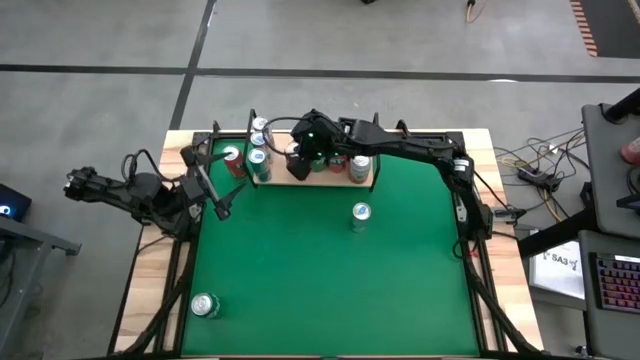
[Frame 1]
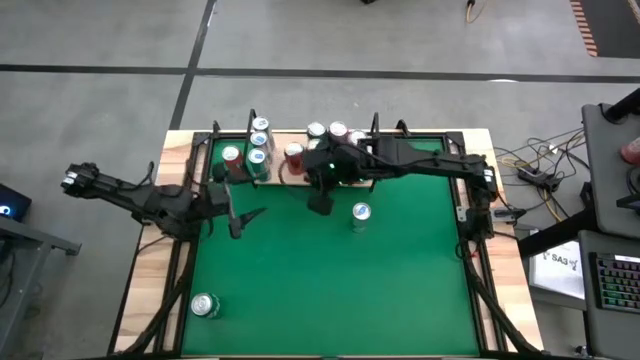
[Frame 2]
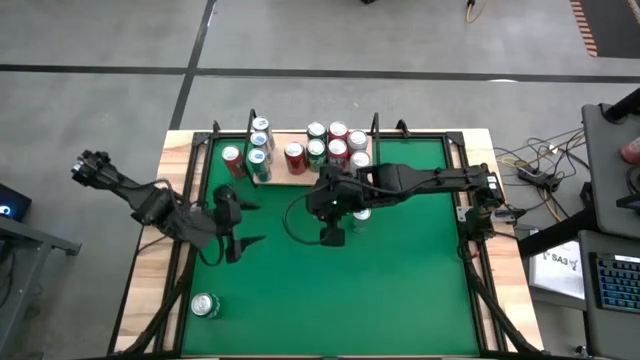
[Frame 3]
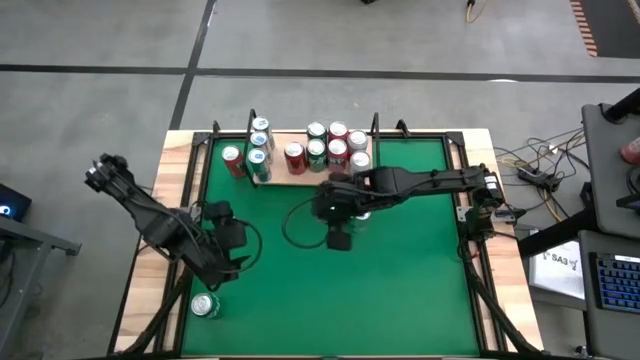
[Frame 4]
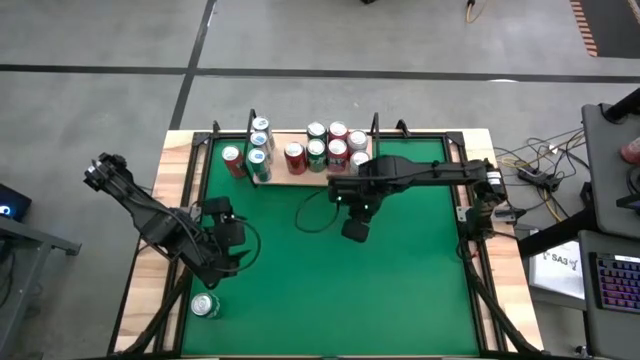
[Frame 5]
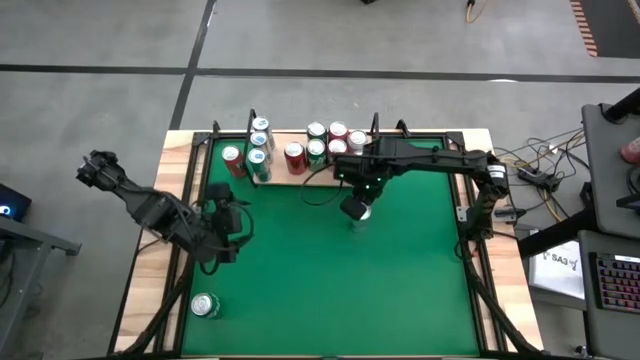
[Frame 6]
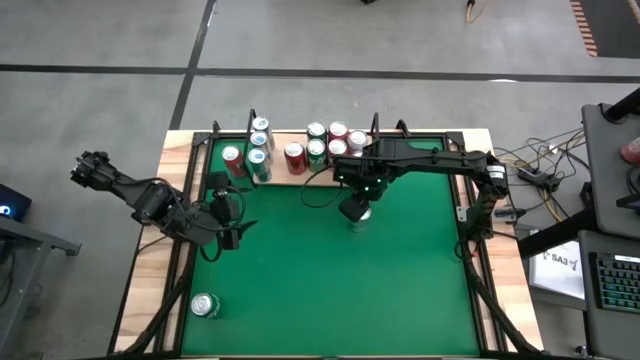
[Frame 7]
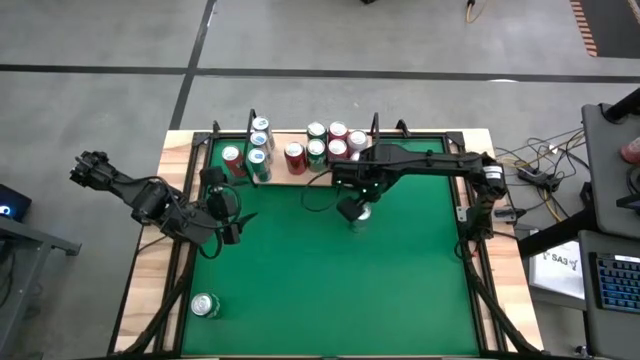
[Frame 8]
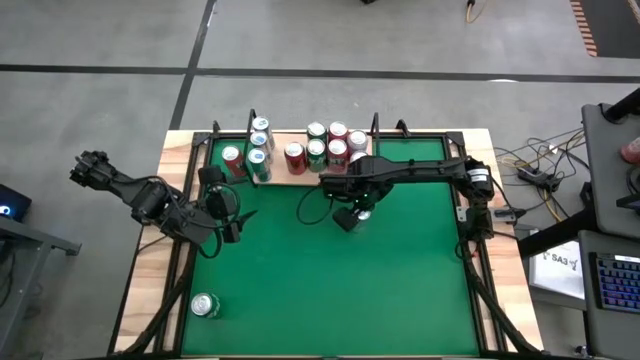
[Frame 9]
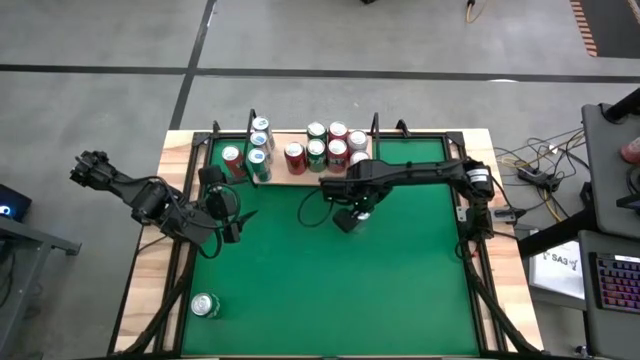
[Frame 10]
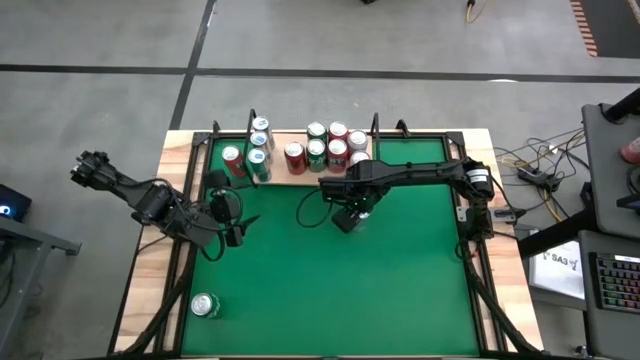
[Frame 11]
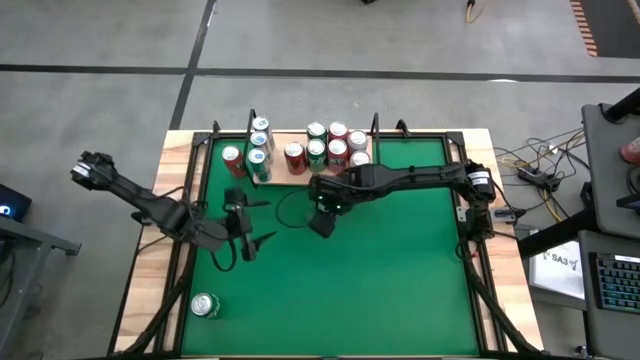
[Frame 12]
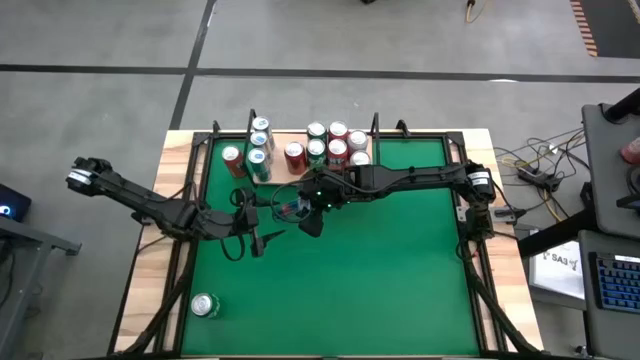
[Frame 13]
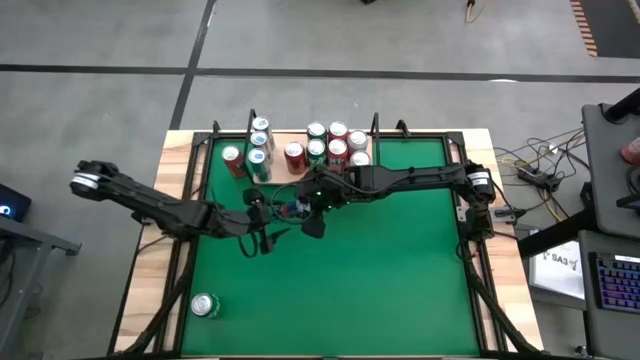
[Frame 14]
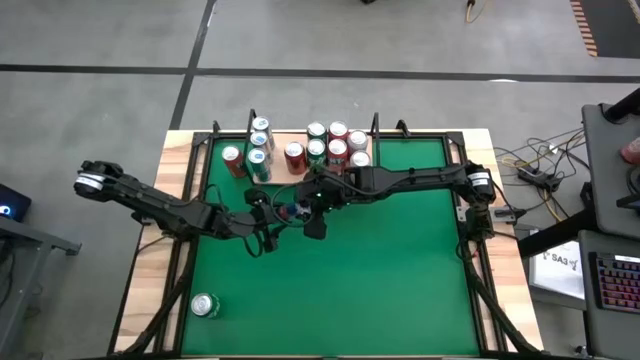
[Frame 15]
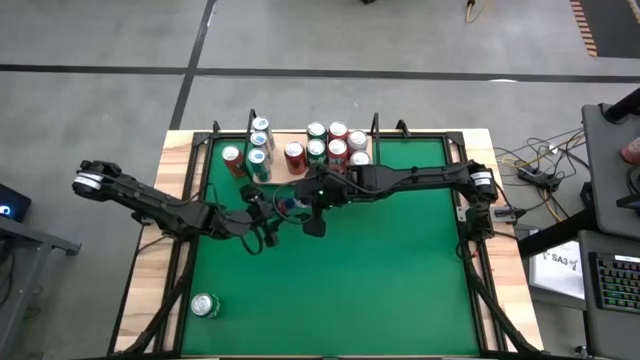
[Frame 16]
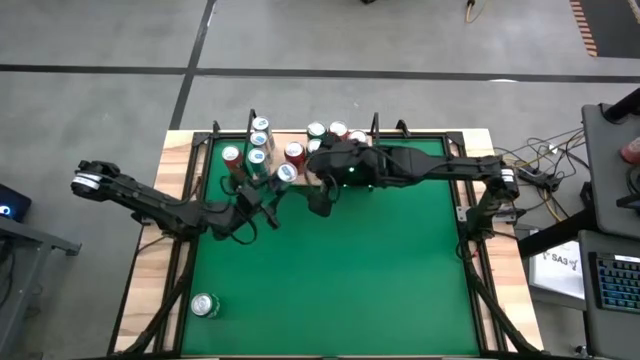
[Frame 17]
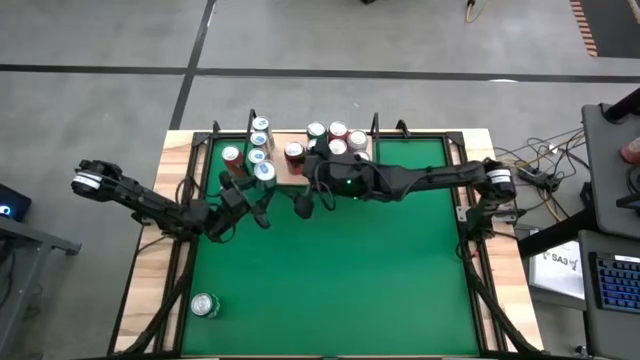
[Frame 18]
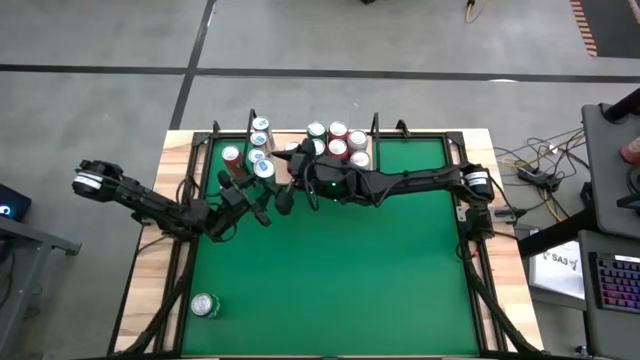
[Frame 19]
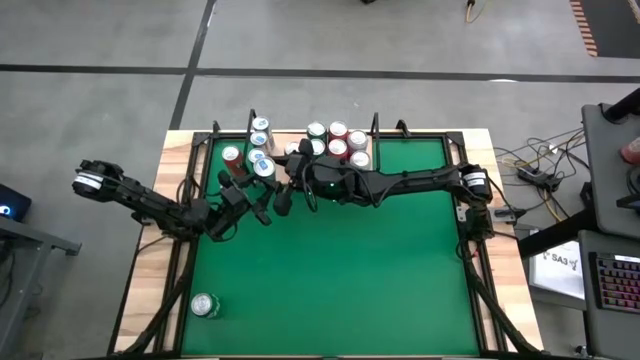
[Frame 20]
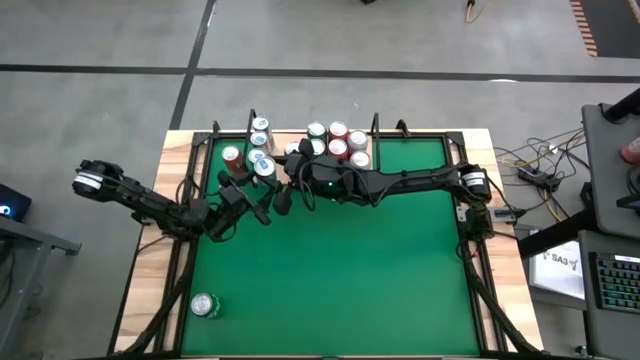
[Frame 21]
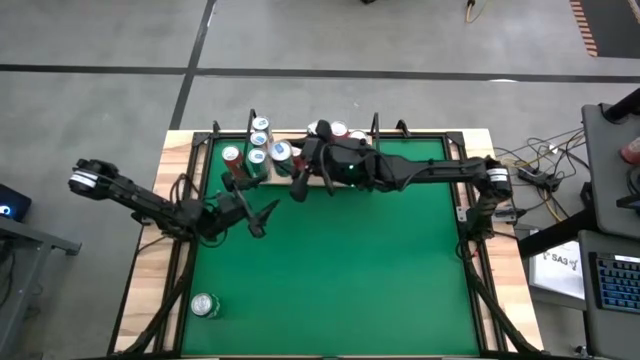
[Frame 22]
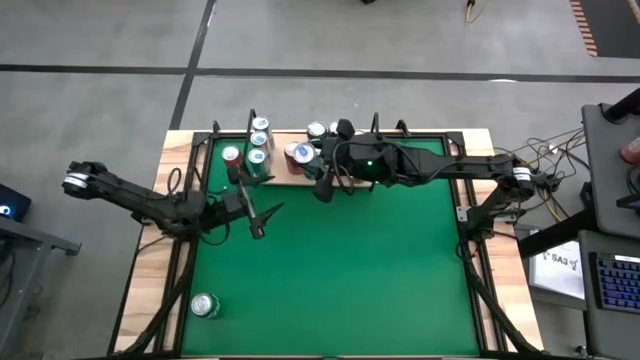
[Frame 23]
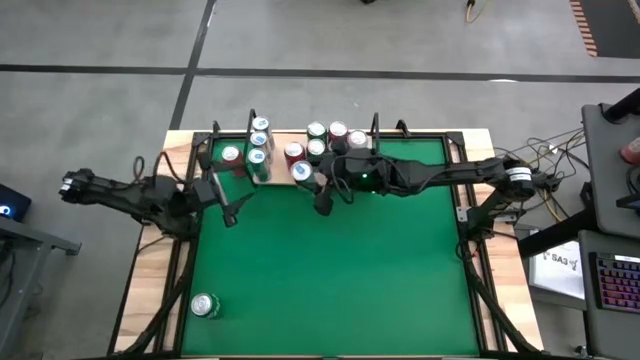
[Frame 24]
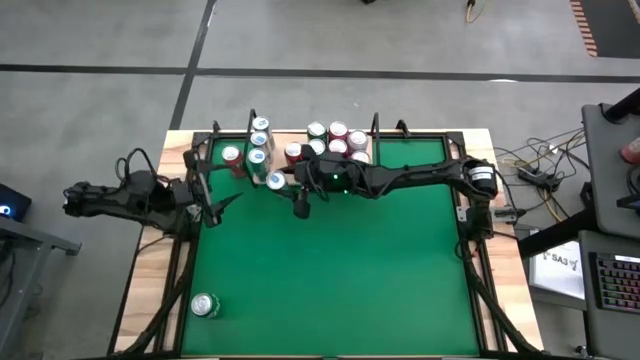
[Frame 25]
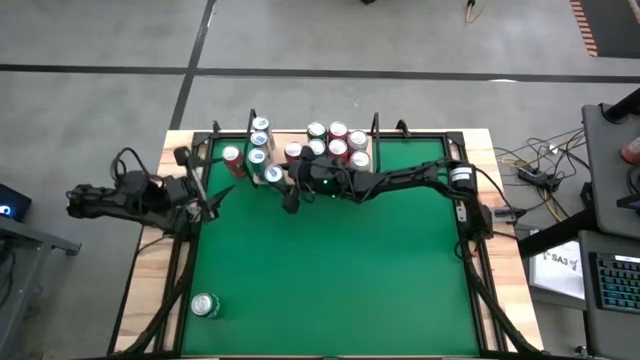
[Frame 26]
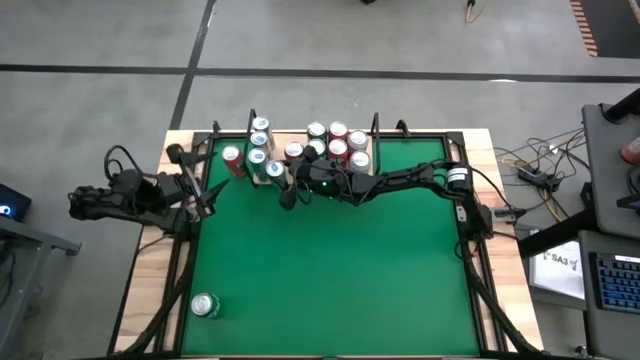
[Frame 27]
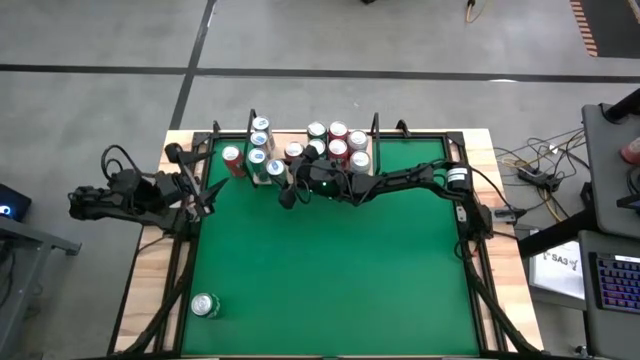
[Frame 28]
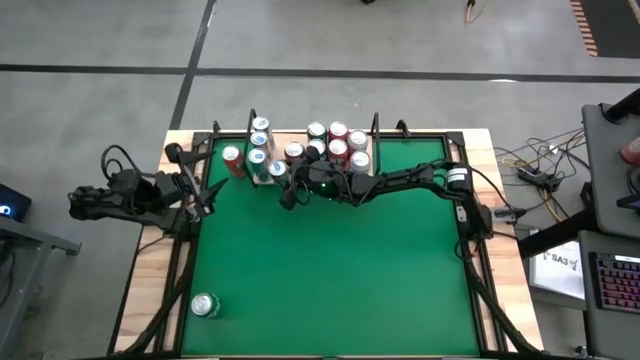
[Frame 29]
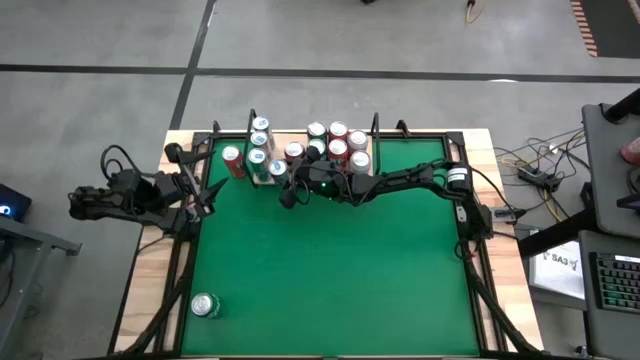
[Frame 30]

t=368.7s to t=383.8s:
Task: Pick and place cans onto a shelf
Put the blue silver soda can on the shelf

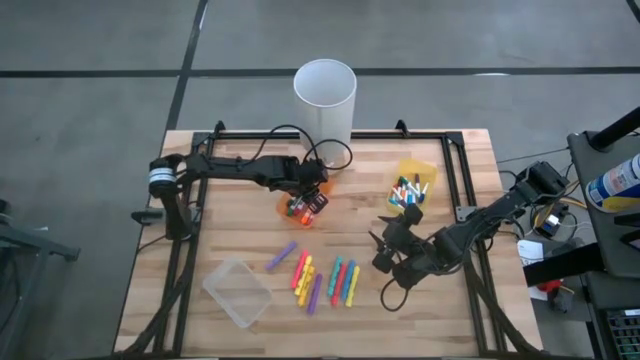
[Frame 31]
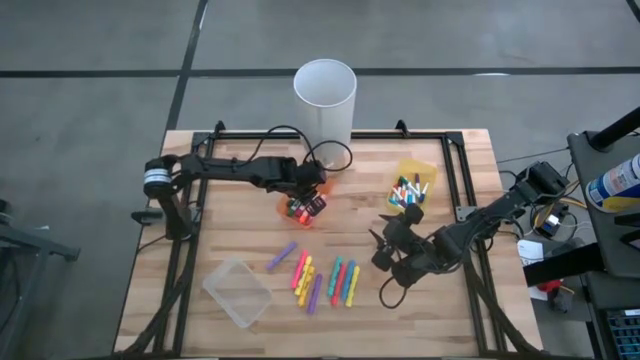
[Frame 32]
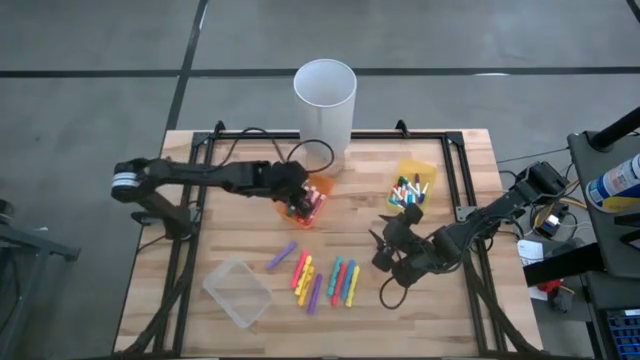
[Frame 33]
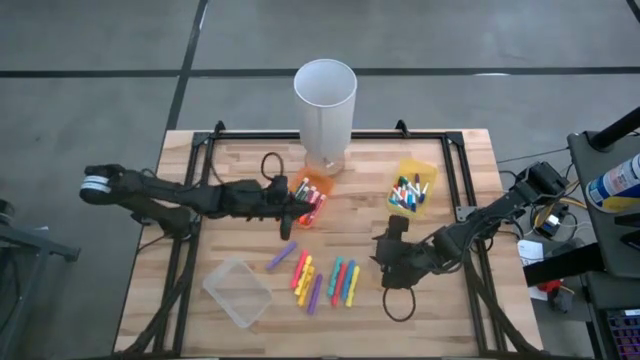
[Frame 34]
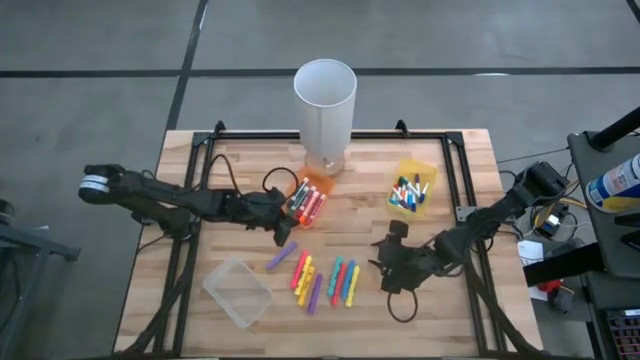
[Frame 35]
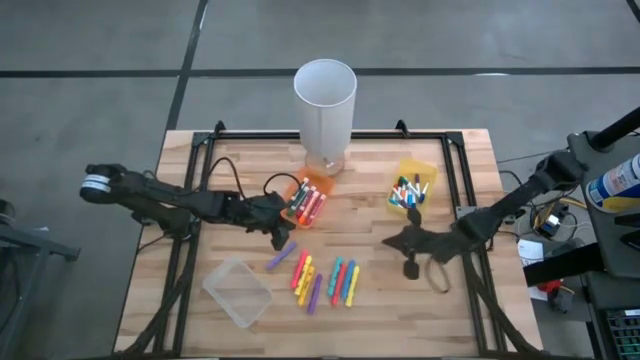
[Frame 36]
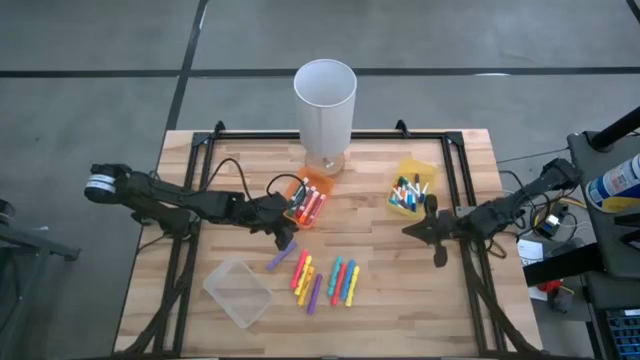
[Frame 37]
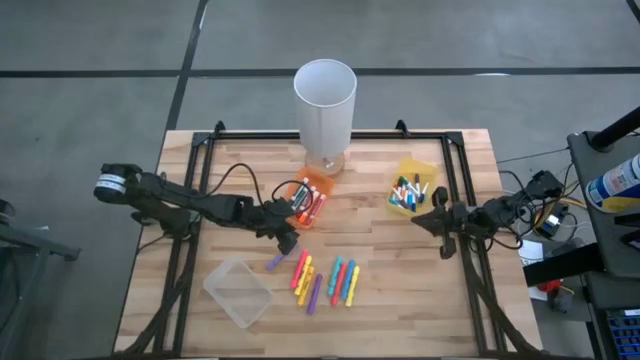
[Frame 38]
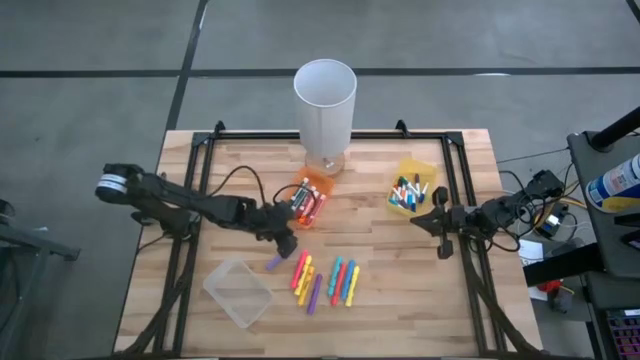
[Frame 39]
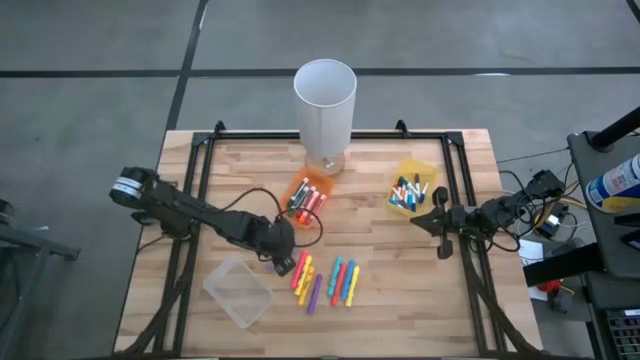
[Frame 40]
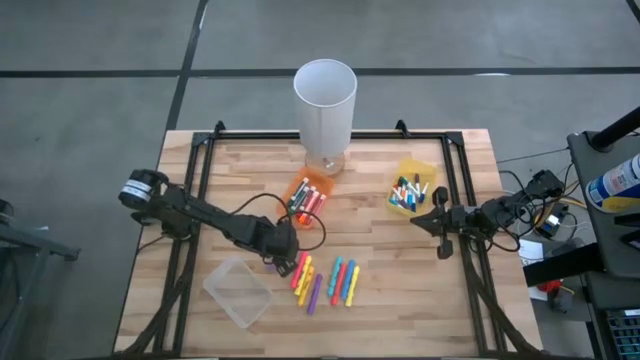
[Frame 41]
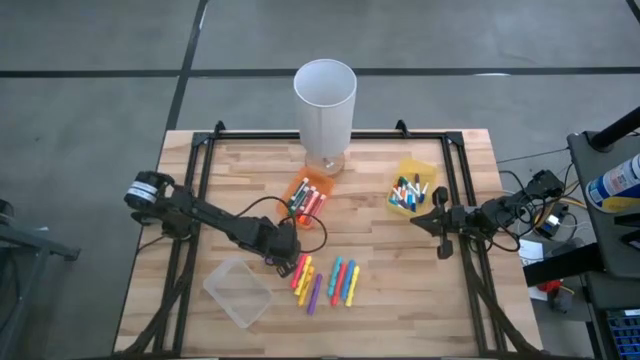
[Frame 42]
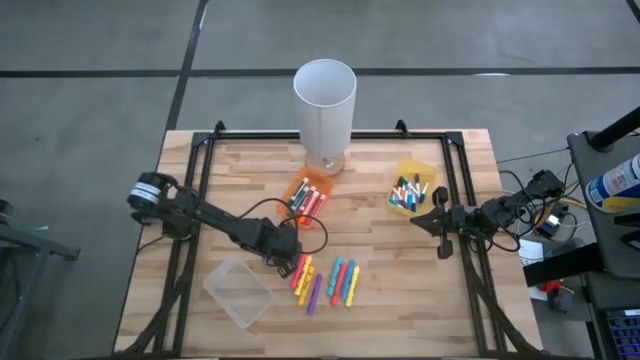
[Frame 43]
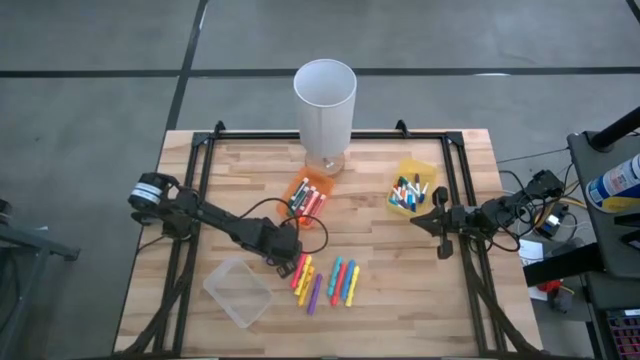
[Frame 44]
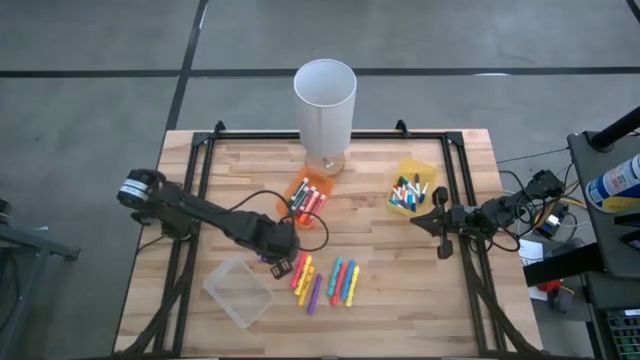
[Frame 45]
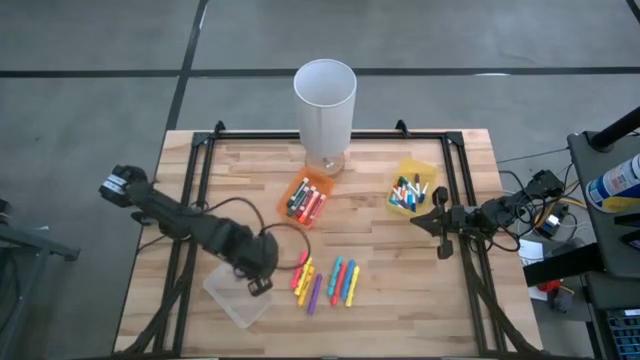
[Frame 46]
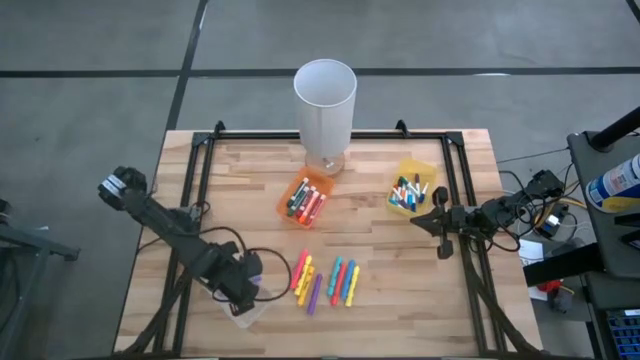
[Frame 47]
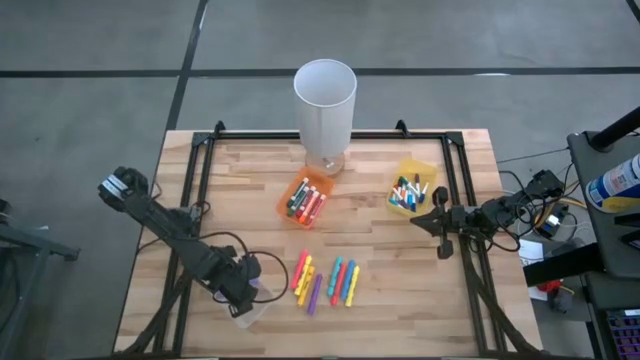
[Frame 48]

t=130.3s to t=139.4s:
Task: Pick & Place Markers
Put the violet highlighter pen into the white bin
